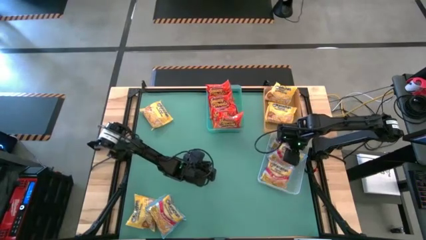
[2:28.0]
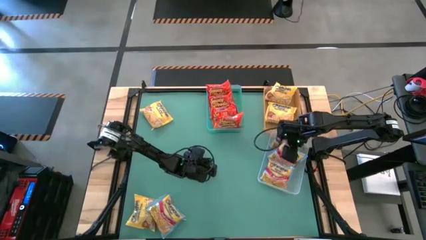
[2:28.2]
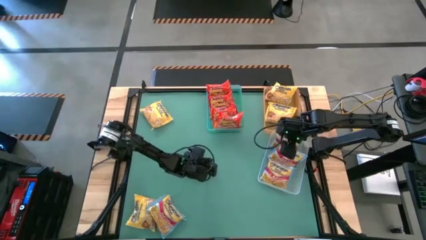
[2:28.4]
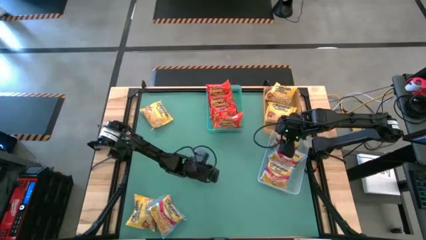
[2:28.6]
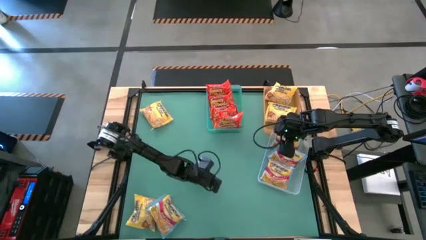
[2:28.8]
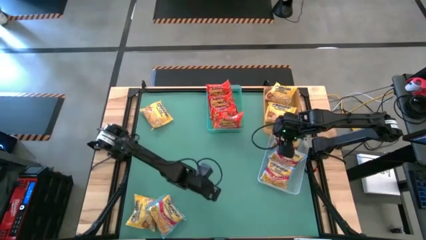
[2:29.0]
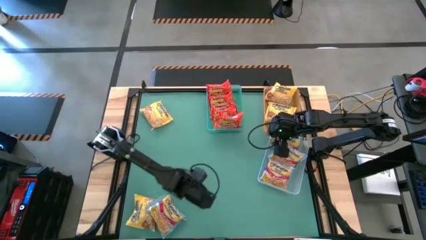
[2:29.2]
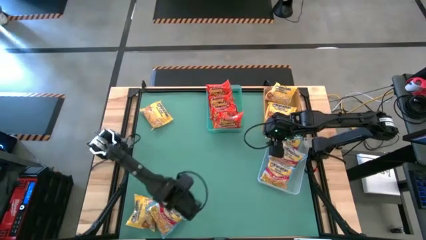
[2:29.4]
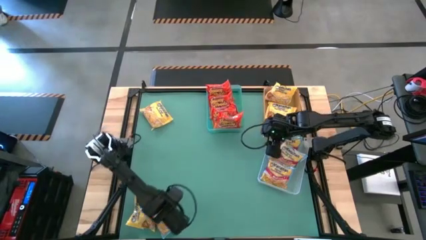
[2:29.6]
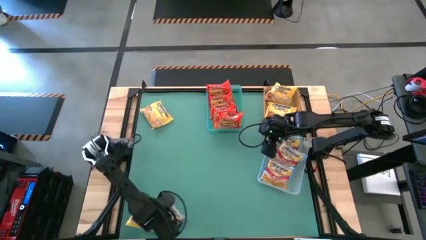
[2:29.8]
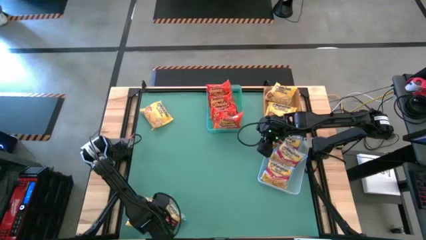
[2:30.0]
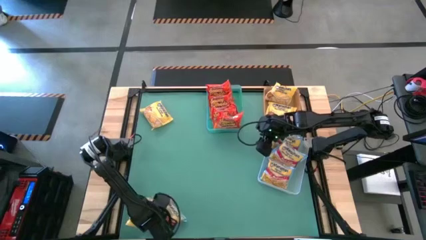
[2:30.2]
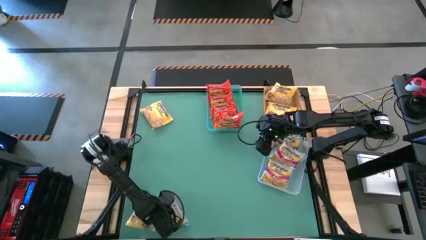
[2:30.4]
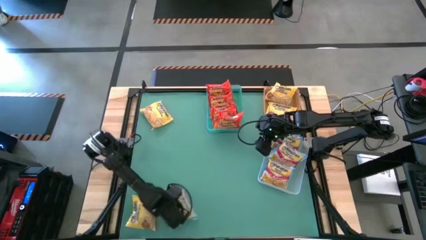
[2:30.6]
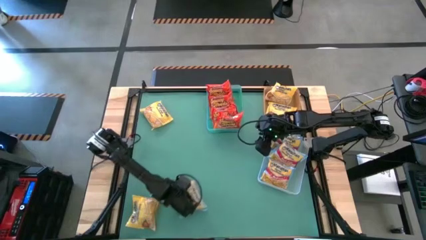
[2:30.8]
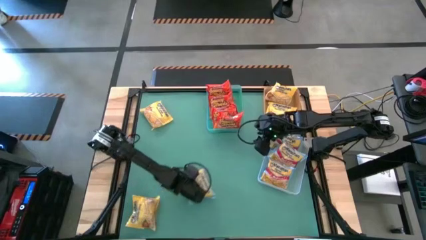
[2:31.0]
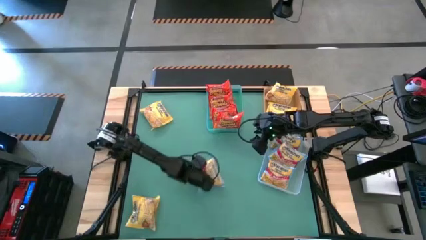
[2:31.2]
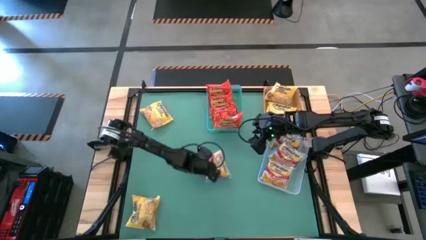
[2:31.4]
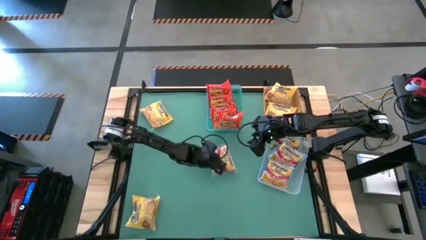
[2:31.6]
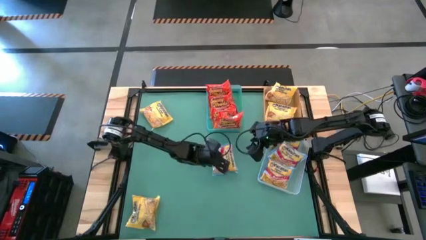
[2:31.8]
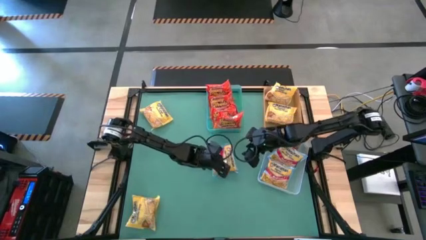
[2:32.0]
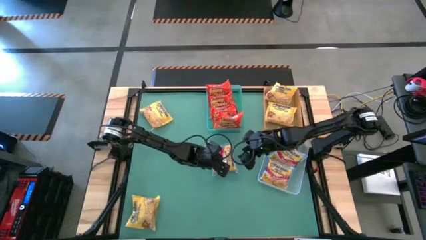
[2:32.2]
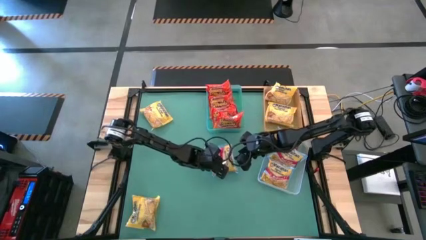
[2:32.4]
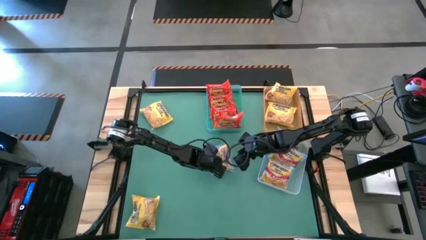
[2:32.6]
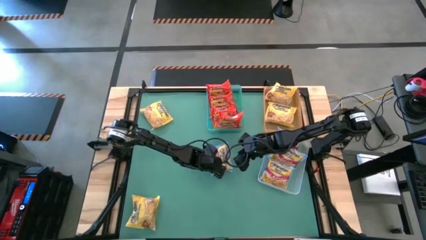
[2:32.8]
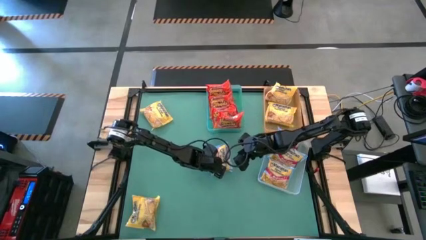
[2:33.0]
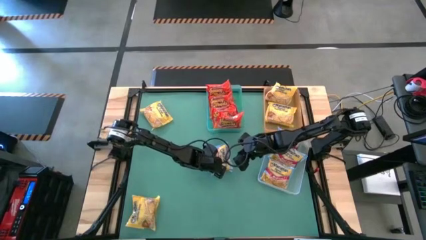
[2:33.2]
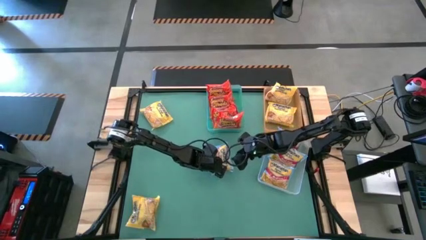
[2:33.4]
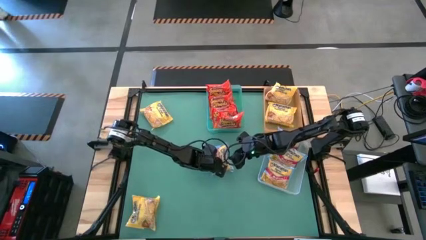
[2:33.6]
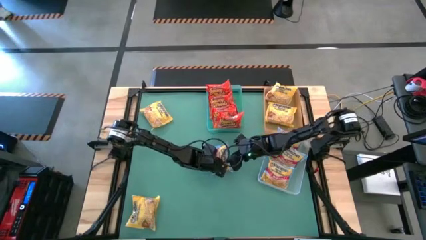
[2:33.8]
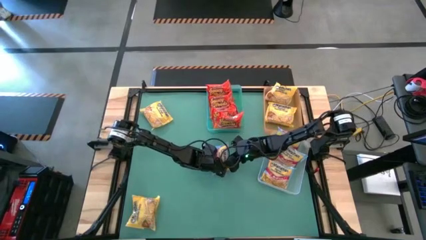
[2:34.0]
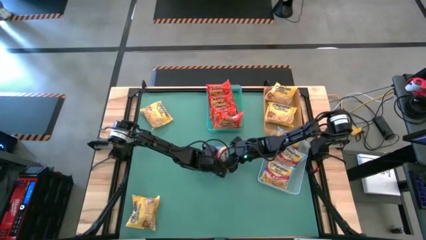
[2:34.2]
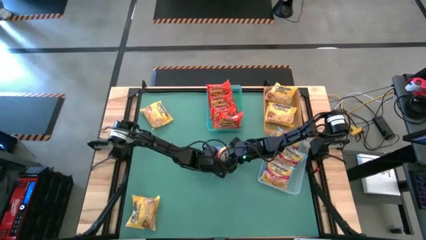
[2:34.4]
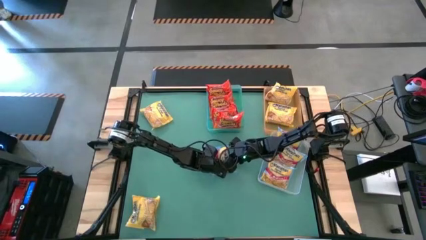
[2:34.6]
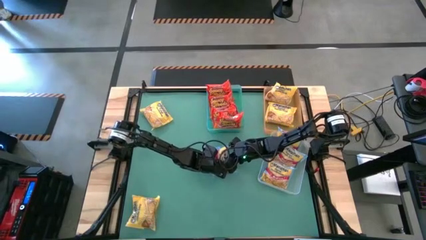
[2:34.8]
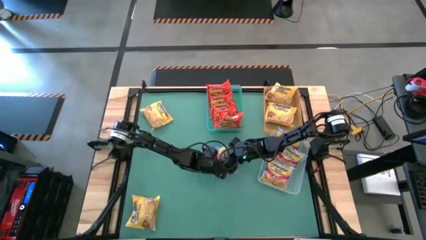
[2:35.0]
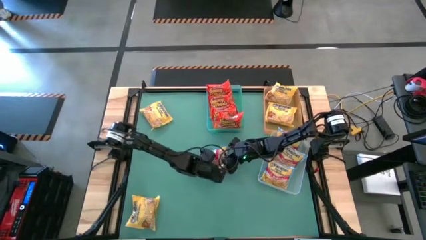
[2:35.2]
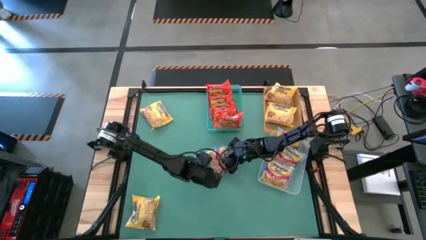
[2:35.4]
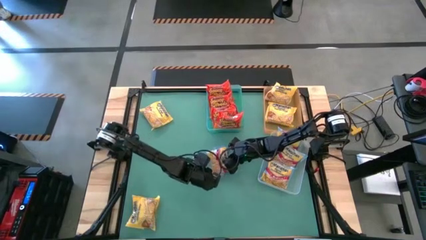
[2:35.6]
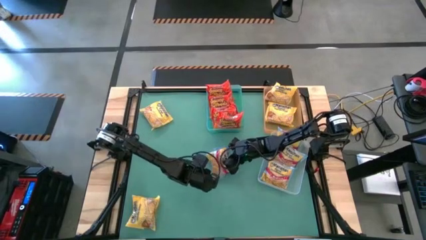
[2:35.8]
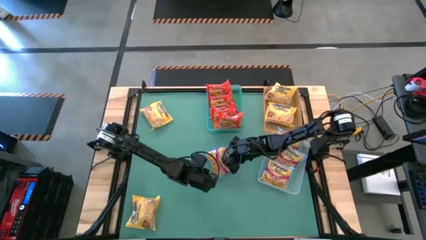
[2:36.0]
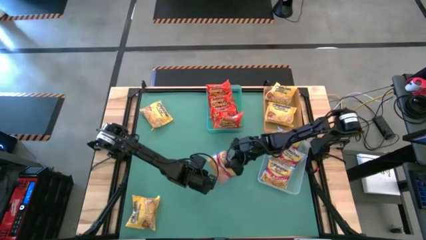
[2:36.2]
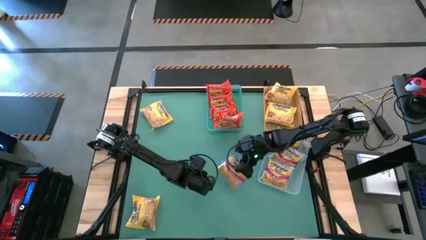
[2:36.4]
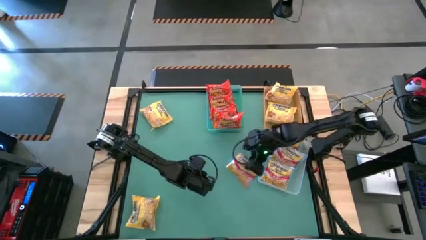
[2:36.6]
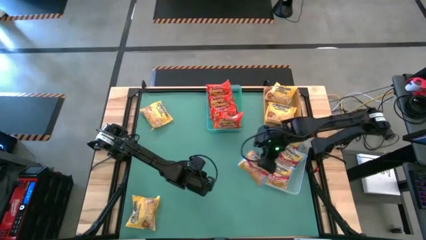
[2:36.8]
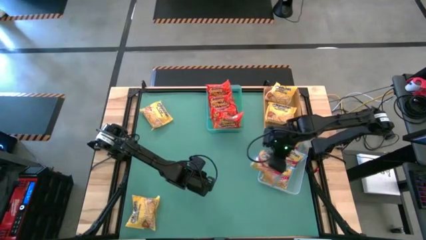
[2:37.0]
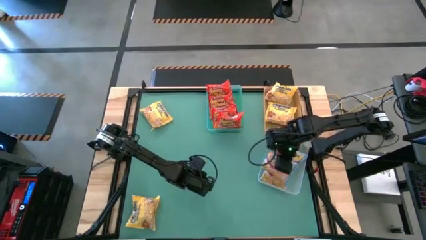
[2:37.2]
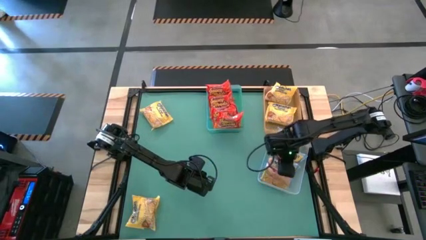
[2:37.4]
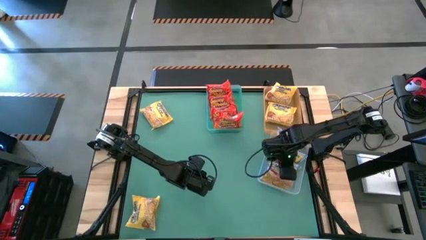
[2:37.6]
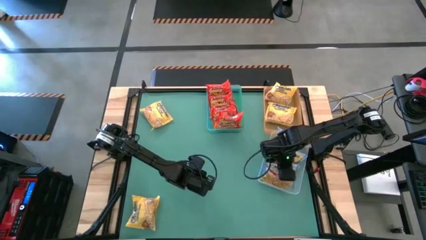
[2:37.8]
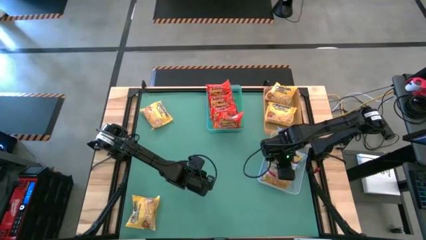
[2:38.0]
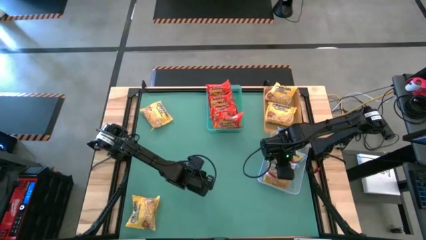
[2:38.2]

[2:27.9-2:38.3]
Task: Sort Maruchan noodles
Put the blue noodle pack into the transparent bin
